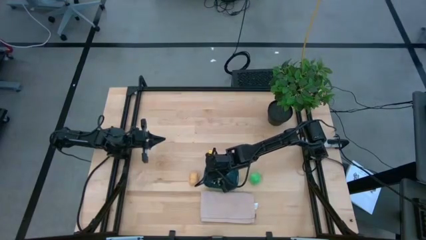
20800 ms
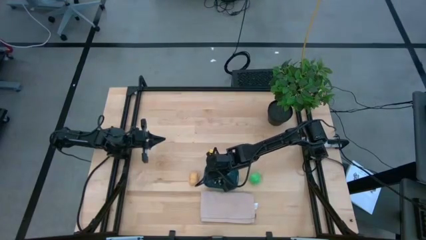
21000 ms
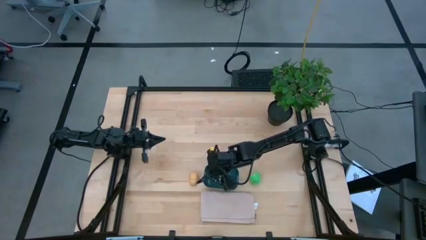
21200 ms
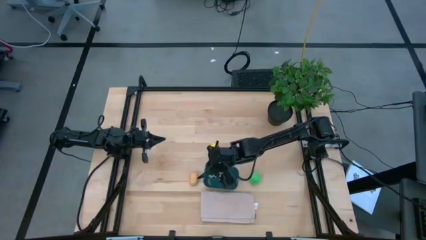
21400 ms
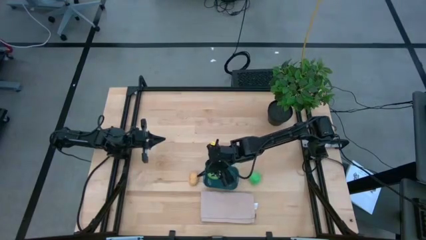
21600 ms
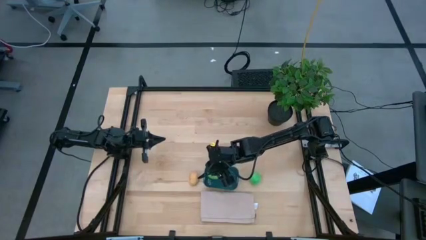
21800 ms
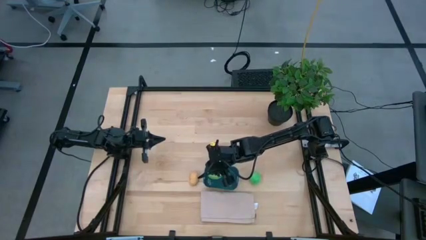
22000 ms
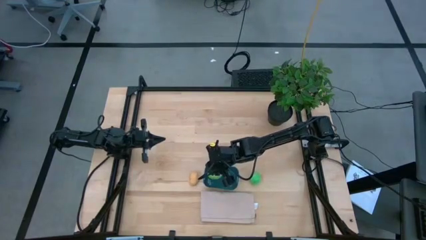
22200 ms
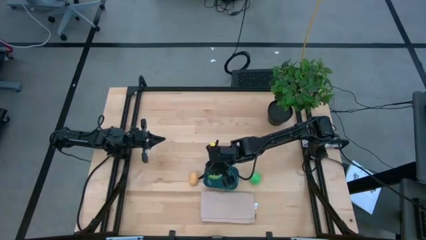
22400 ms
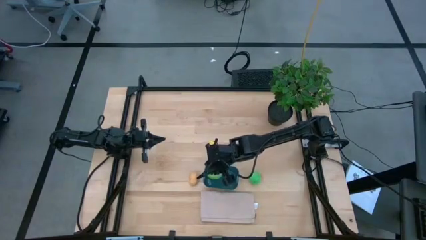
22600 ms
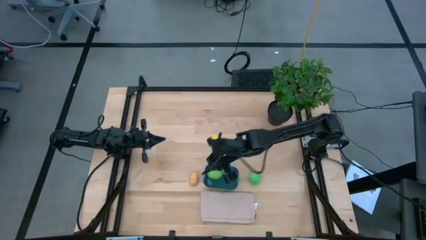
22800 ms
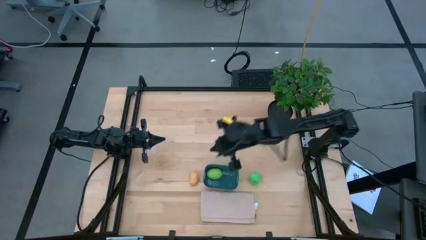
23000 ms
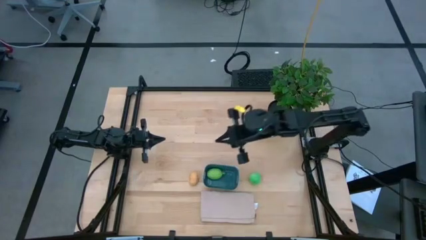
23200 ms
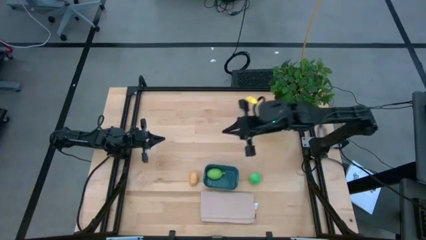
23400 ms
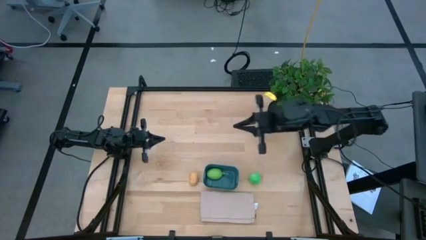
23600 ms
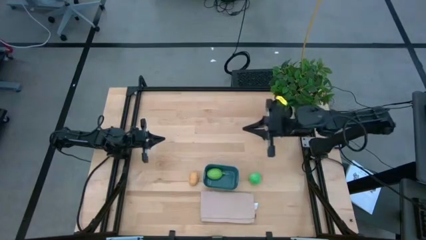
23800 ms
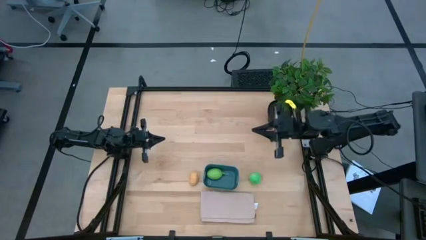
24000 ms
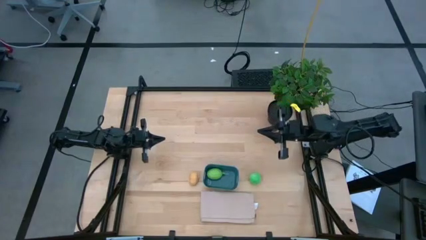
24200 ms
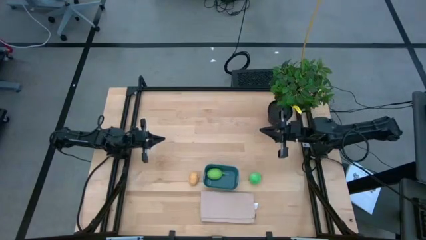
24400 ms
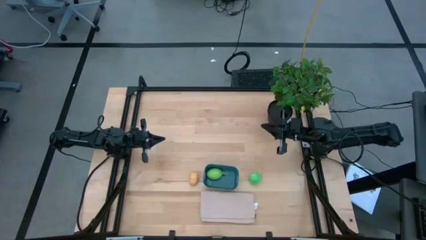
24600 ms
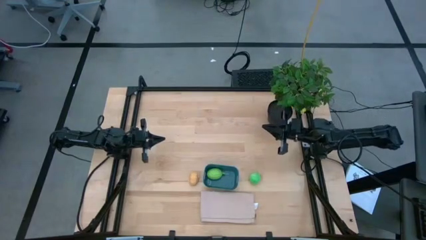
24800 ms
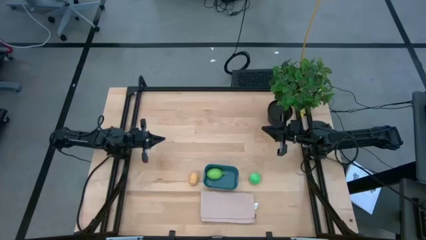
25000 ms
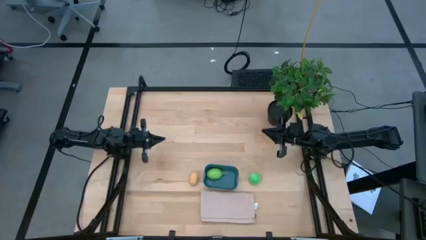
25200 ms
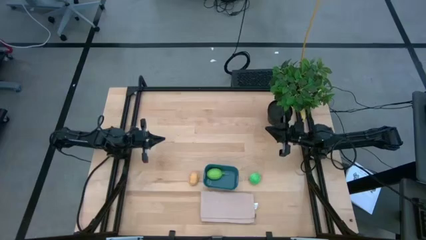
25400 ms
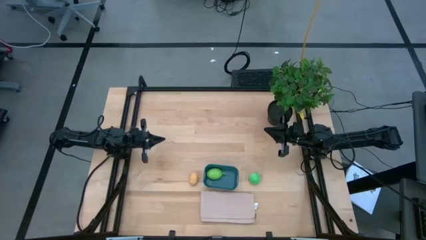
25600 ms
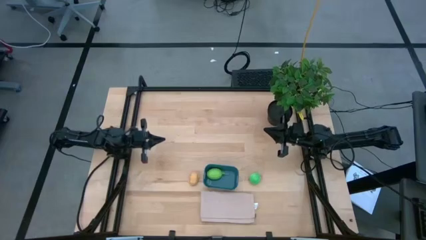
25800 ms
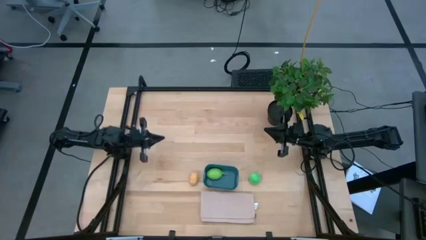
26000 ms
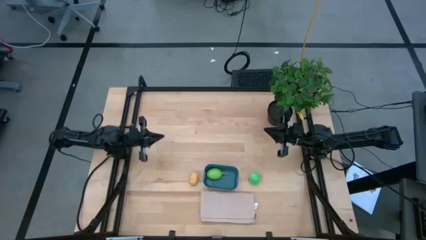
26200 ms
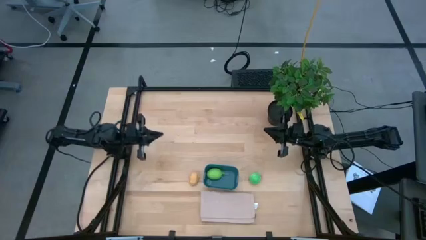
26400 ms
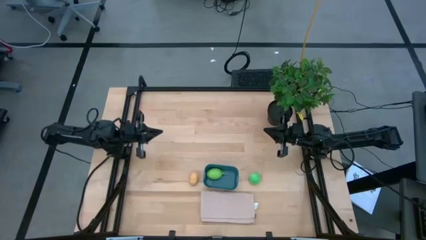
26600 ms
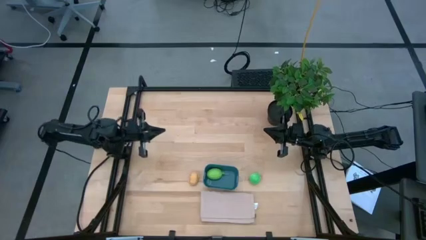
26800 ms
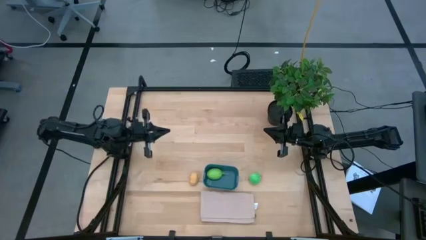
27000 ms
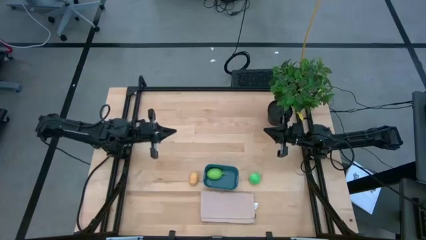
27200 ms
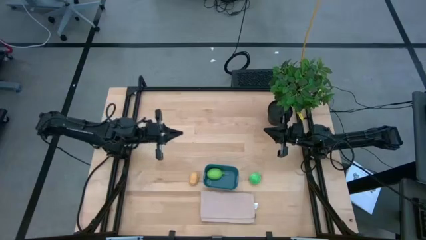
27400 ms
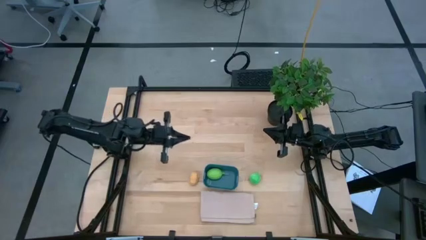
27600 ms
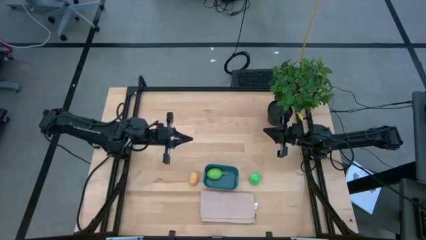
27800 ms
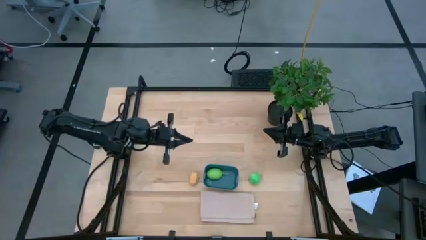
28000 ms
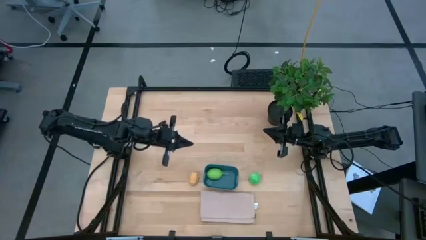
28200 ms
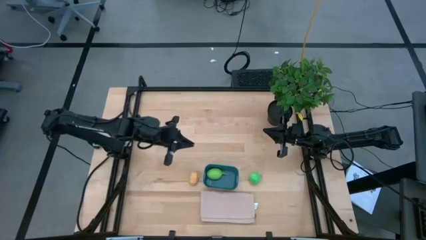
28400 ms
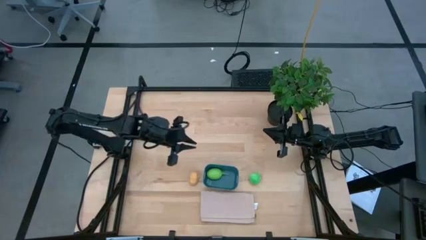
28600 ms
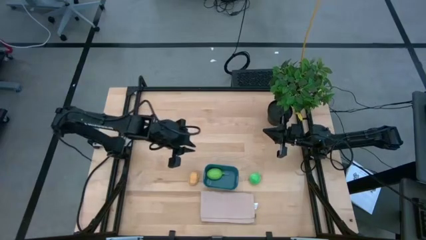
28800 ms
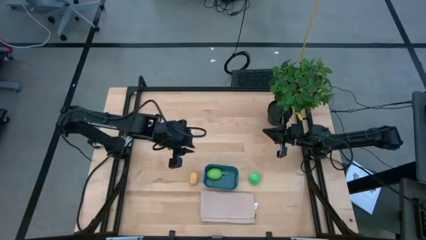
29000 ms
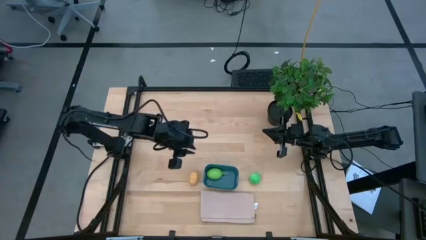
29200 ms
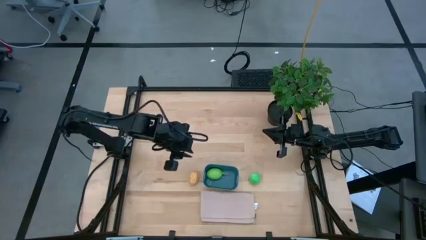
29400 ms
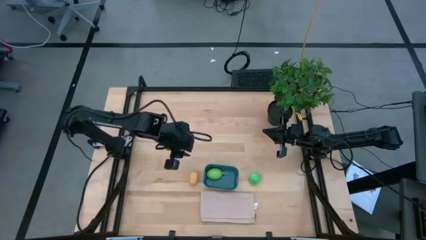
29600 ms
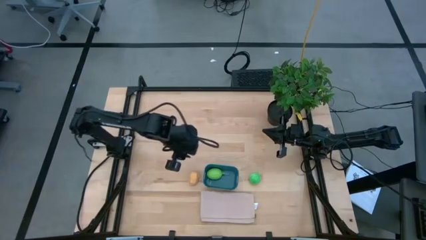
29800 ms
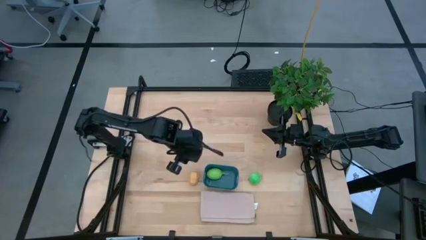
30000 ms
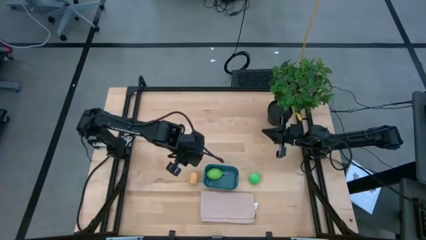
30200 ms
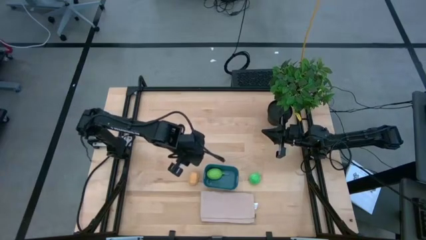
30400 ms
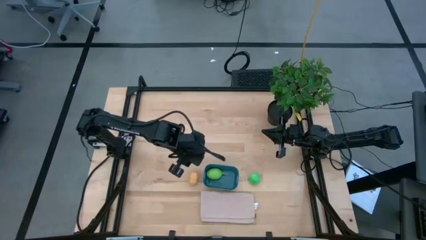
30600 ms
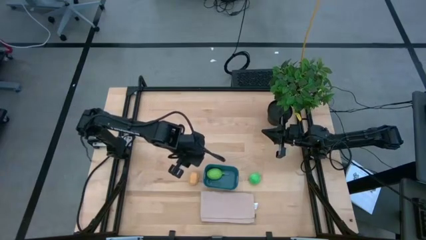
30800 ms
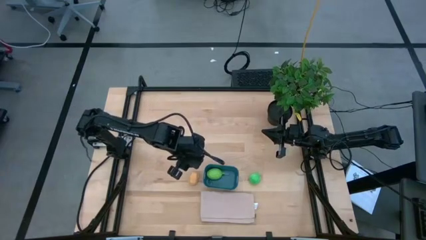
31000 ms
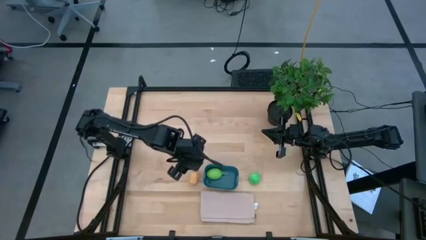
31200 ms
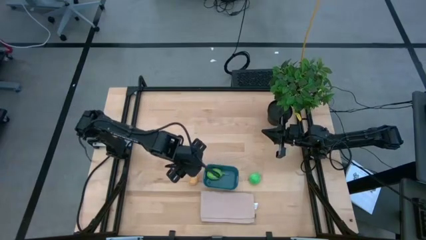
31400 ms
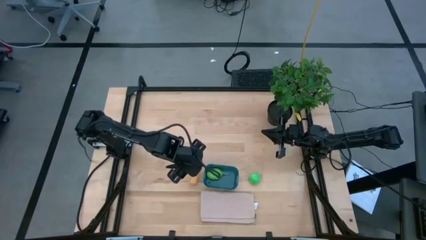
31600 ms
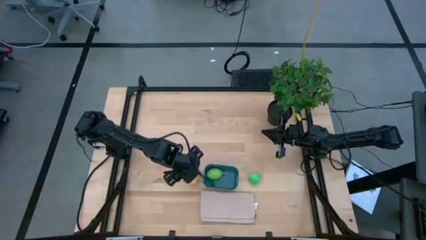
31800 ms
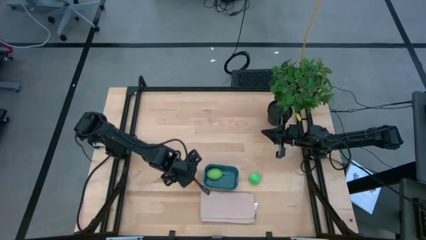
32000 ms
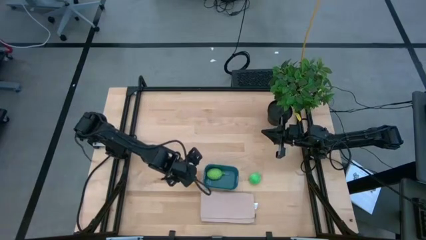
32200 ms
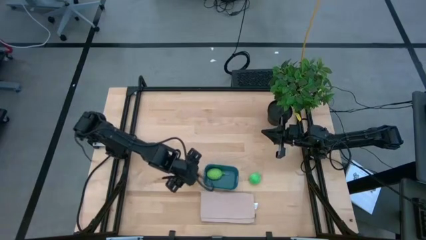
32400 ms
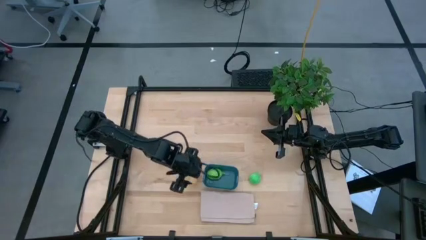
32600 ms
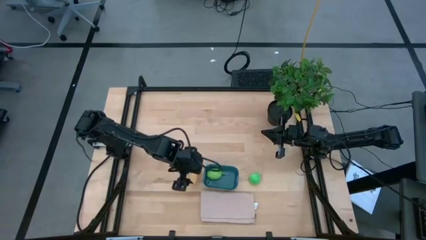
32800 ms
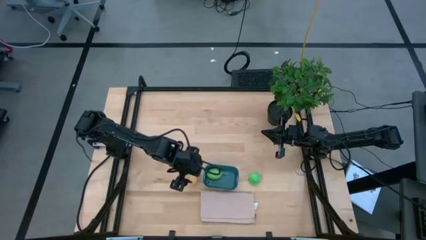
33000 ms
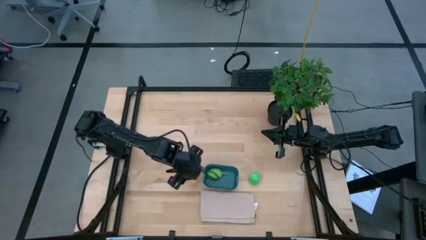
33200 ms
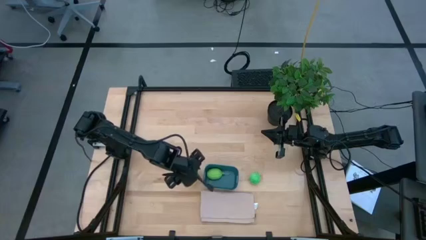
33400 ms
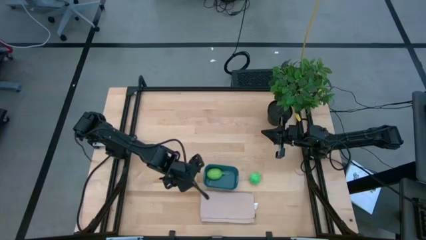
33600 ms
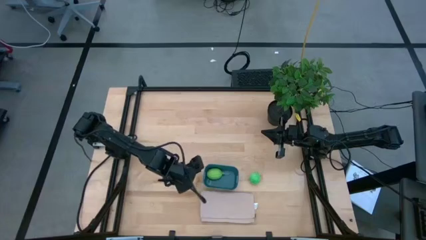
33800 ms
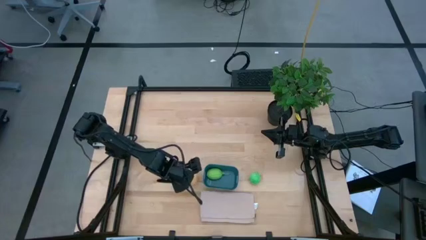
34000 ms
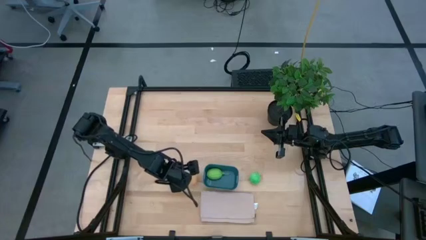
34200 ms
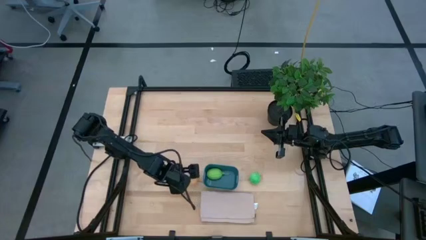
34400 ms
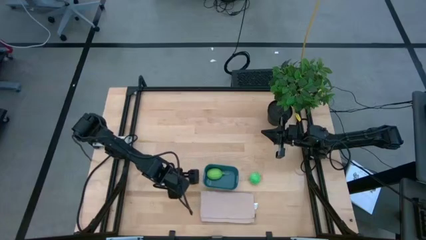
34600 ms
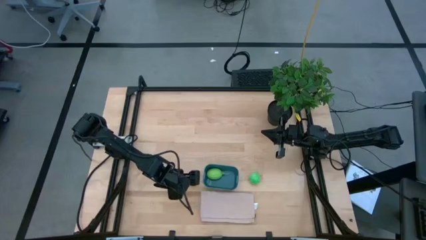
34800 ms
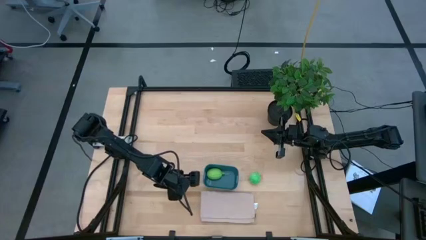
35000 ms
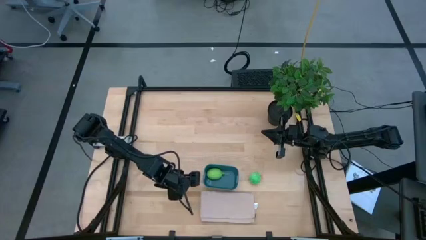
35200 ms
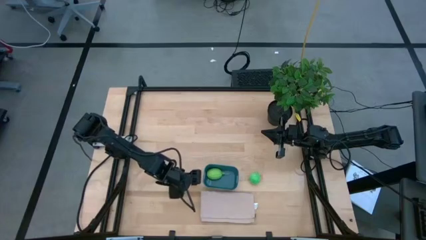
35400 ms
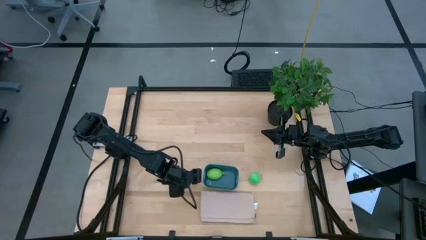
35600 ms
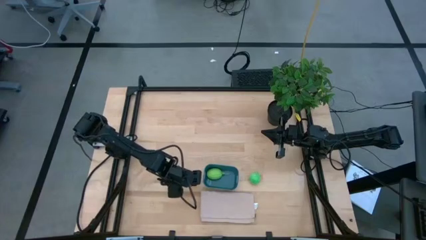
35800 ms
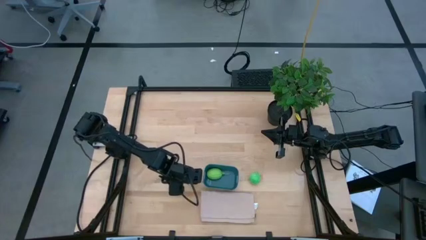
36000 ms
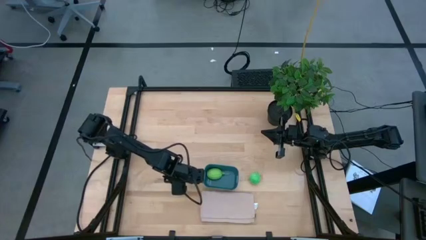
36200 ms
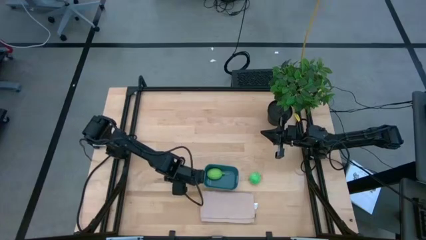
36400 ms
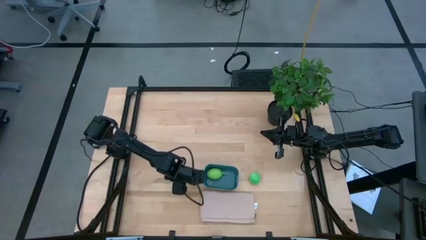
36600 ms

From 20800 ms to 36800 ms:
Task: Pick and placing Produce into tupperware
Put the brown potato into the dark blue bin
